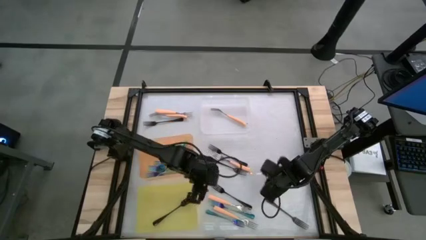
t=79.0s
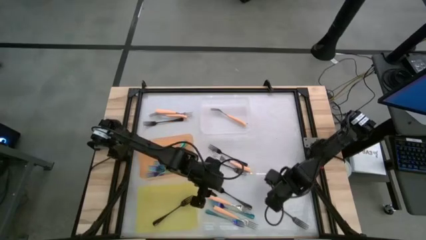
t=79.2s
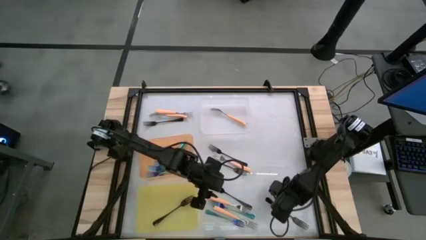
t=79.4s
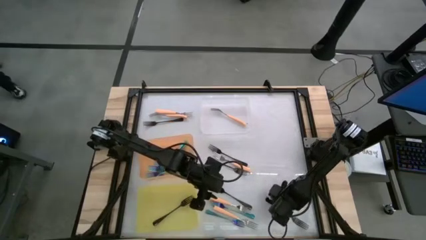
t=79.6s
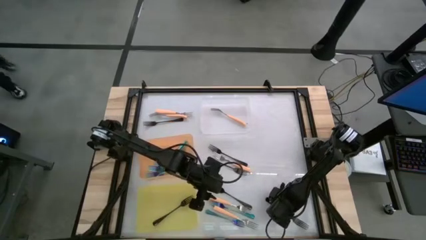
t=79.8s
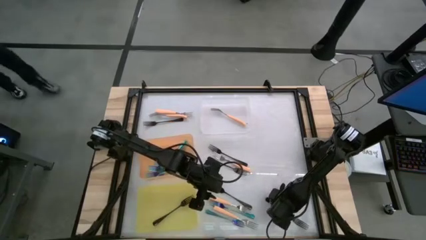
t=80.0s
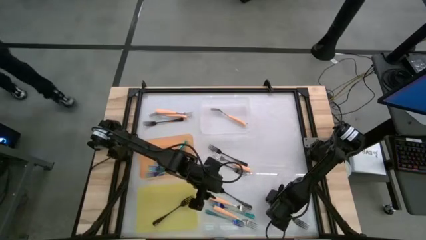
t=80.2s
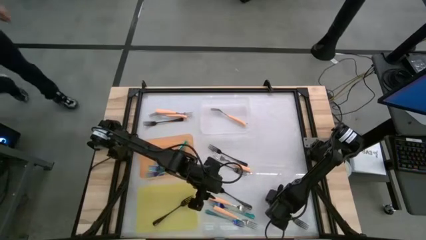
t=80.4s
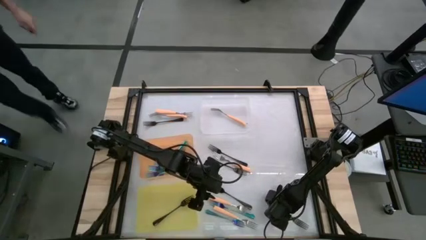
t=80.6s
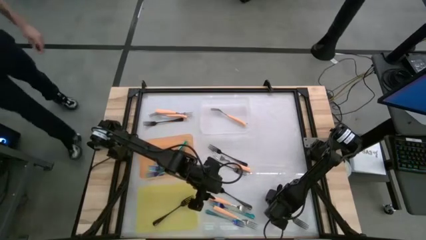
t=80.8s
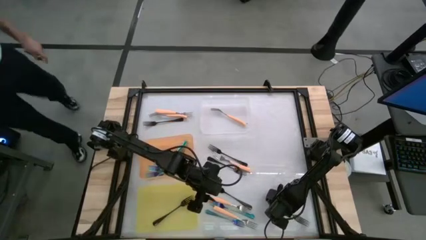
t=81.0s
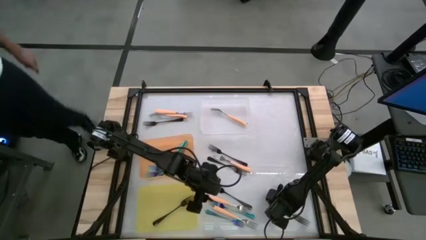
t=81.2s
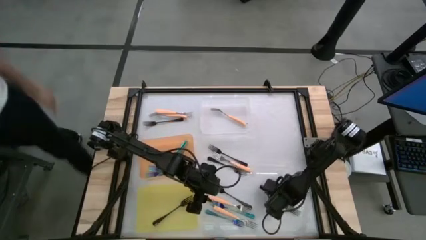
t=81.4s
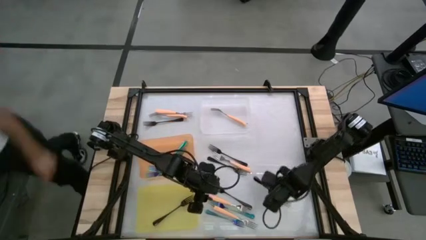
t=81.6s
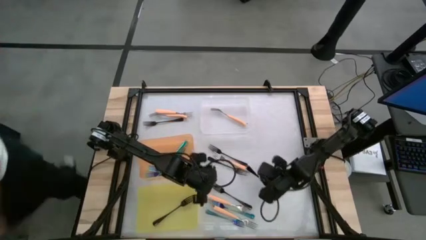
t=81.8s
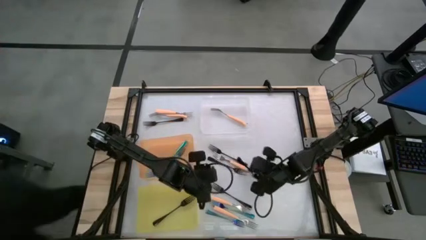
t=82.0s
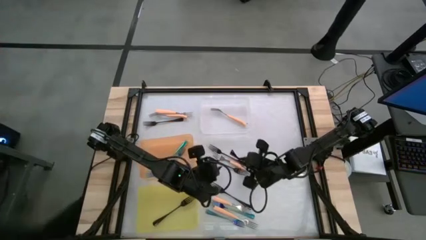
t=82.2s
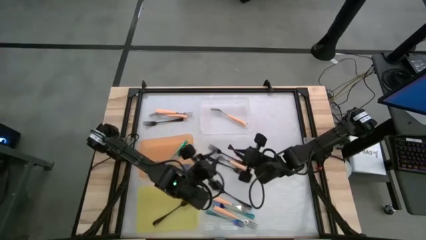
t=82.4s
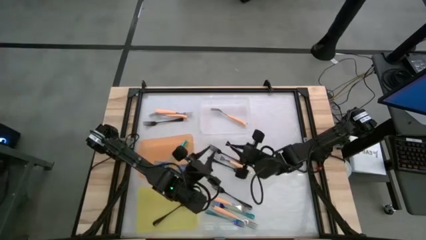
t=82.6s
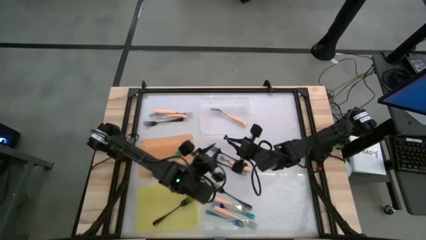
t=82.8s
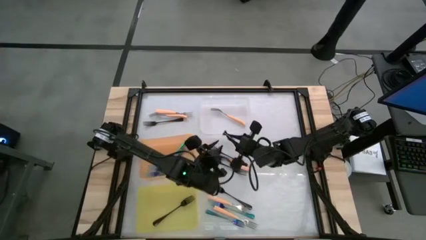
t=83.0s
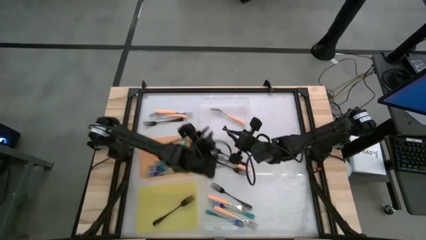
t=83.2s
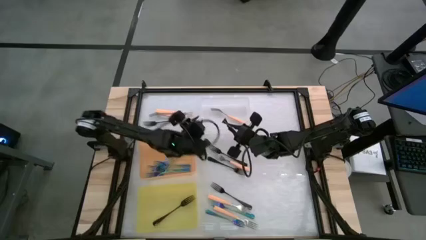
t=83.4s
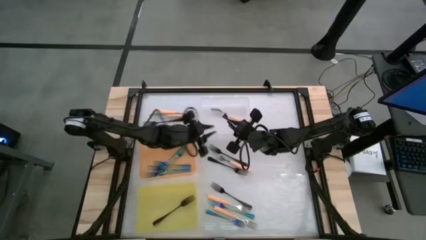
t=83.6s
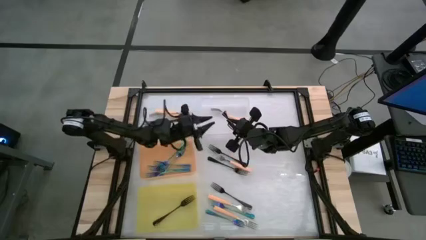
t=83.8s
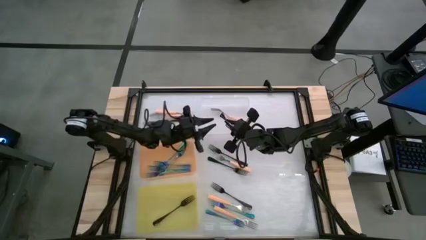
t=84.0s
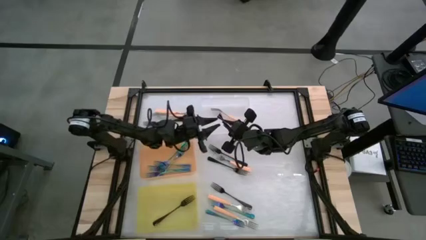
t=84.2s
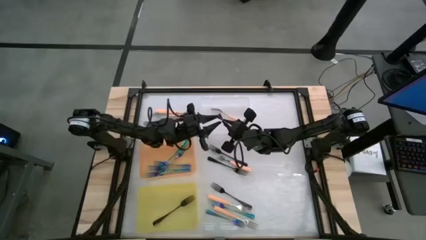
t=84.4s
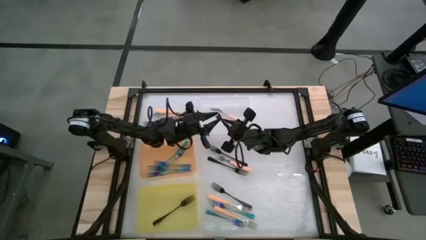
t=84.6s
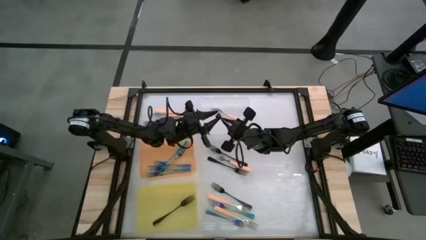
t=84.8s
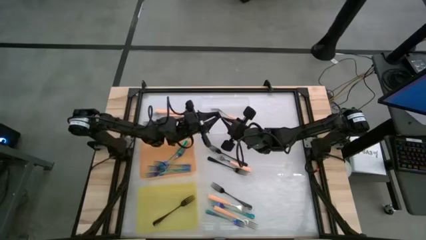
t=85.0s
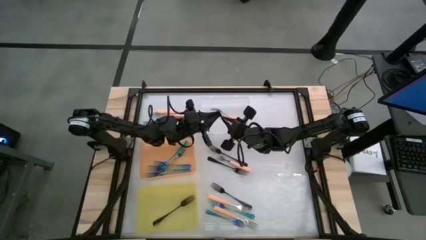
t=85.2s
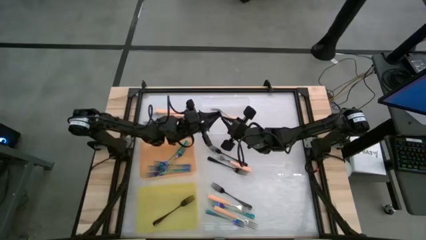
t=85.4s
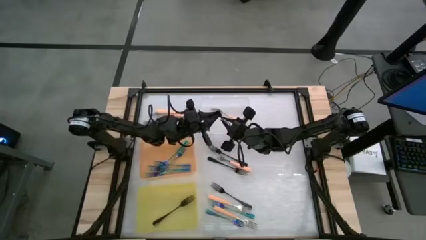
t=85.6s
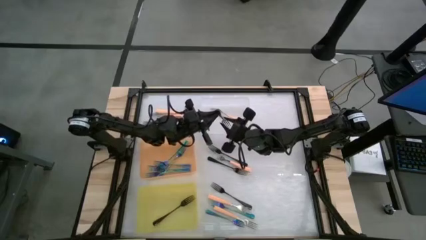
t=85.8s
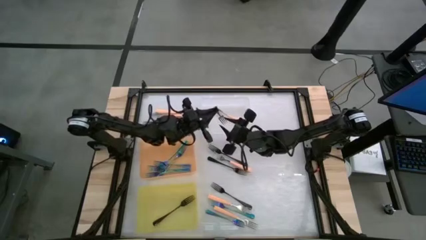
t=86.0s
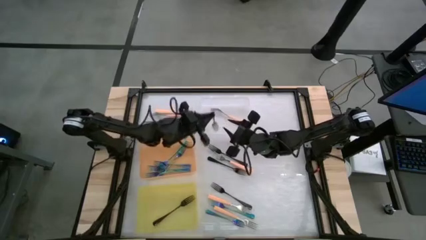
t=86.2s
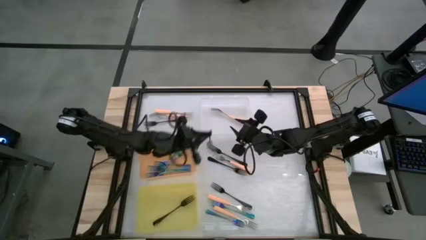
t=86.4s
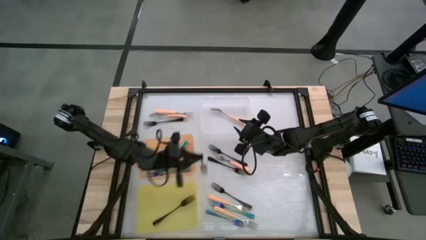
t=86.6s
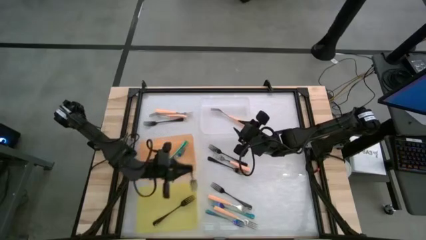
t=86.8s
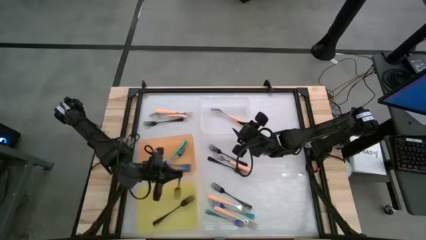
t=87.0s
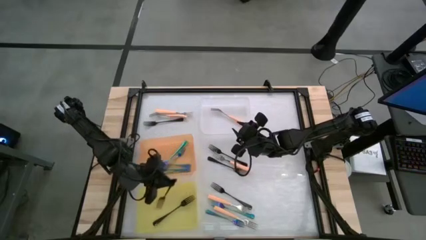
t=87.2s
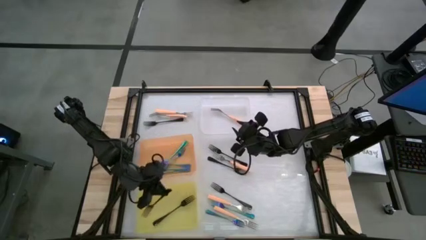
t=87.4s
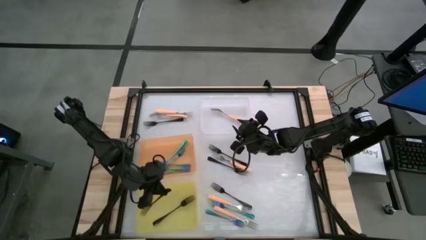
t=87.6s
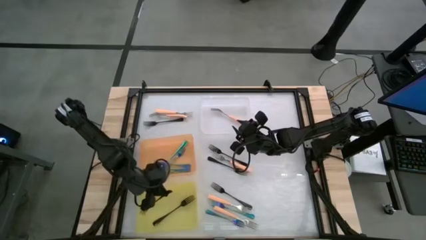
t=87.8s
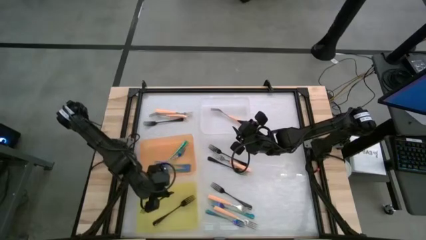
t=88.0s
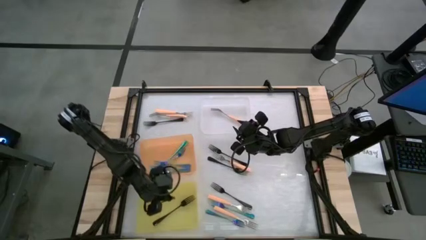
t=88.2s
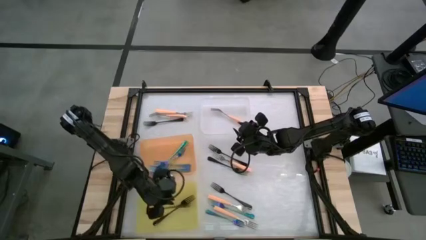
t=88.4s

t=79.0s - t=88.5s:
Task: Sort silverware by color (type)
Put the black fork into the yellow bin

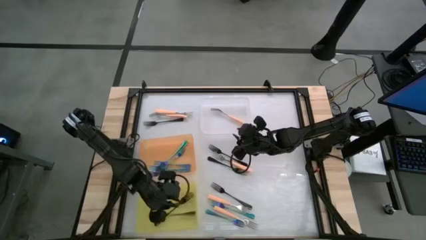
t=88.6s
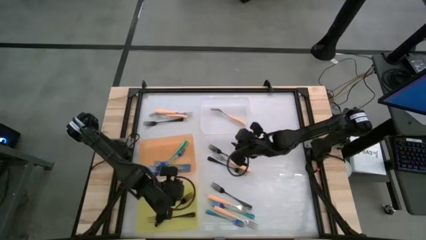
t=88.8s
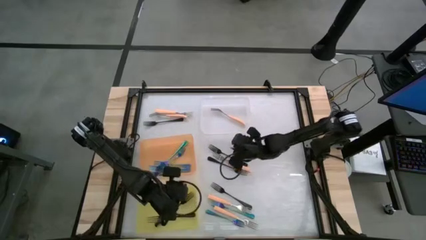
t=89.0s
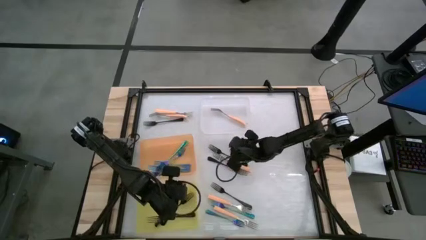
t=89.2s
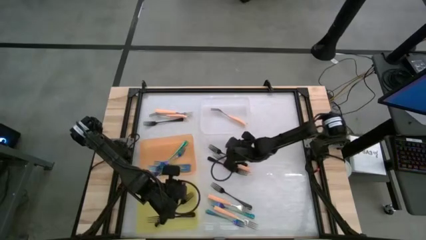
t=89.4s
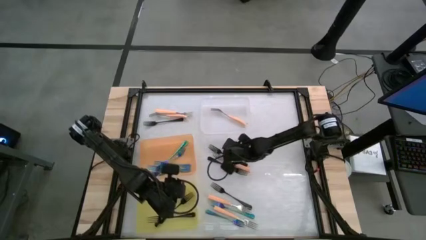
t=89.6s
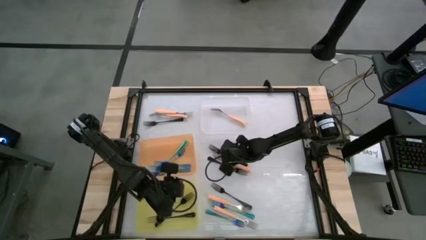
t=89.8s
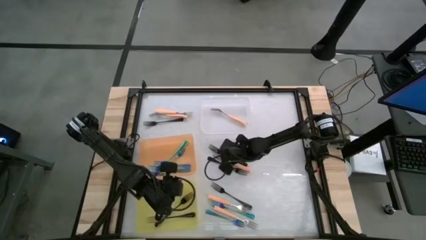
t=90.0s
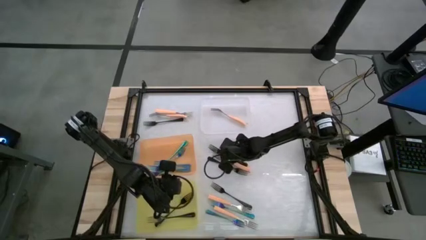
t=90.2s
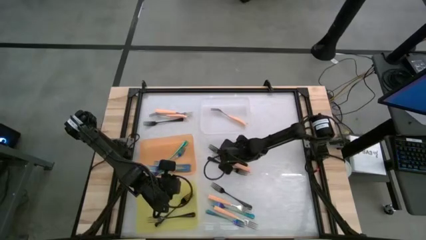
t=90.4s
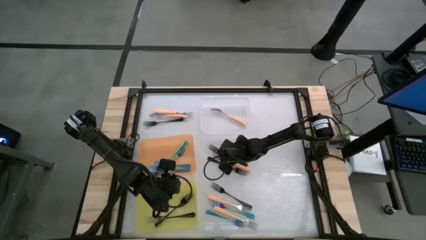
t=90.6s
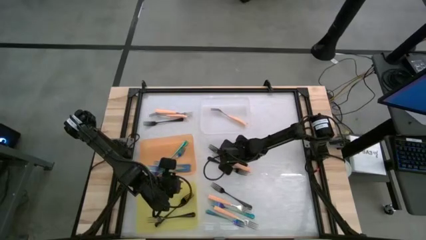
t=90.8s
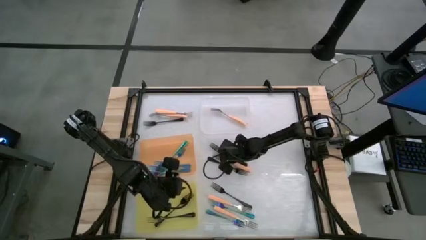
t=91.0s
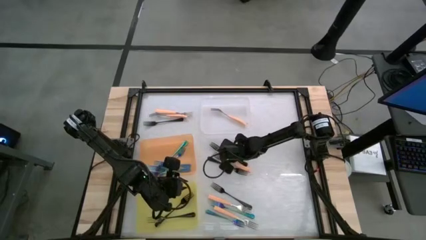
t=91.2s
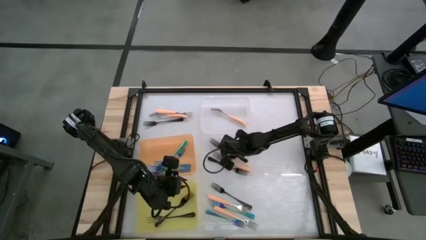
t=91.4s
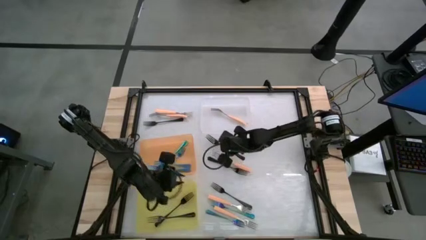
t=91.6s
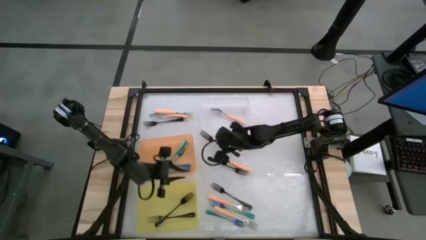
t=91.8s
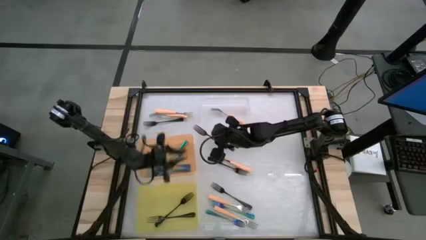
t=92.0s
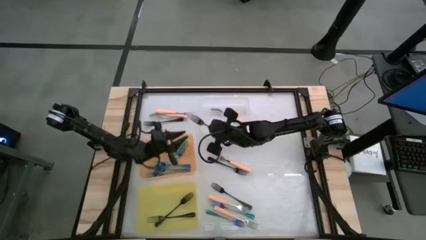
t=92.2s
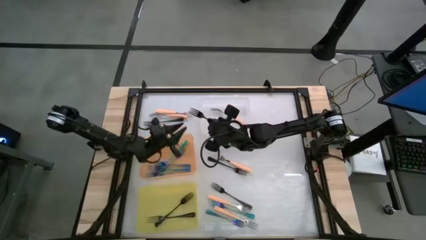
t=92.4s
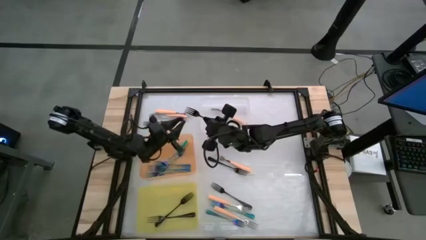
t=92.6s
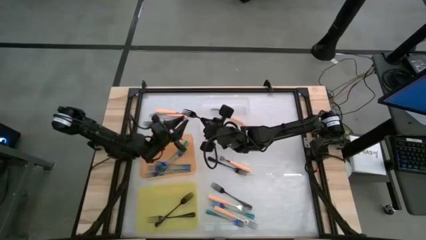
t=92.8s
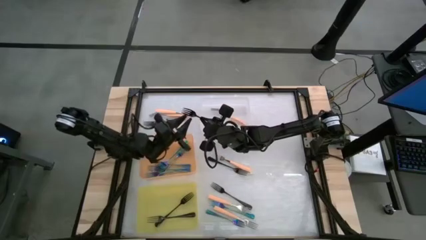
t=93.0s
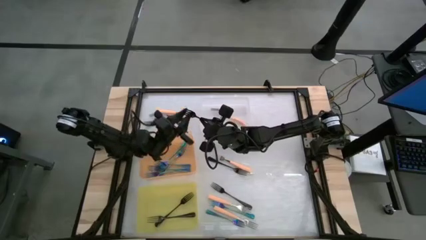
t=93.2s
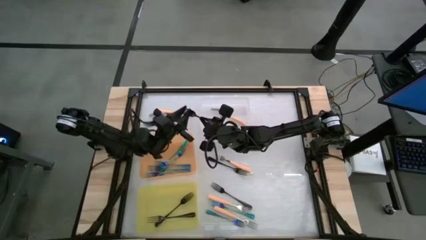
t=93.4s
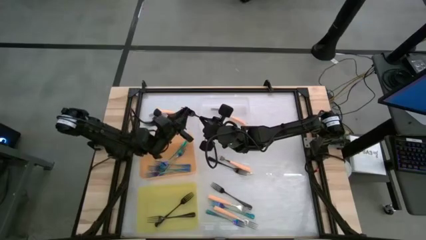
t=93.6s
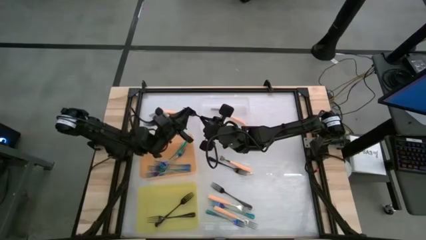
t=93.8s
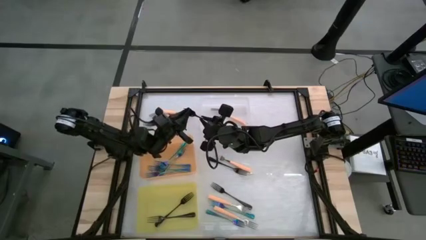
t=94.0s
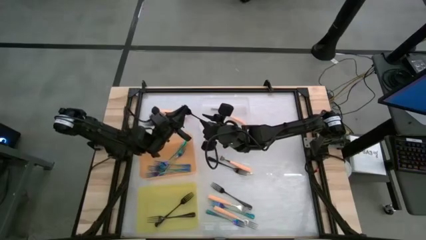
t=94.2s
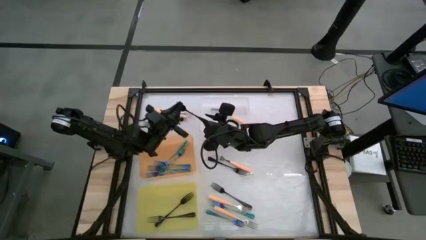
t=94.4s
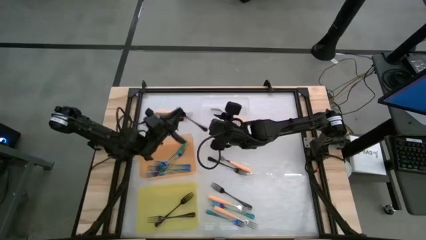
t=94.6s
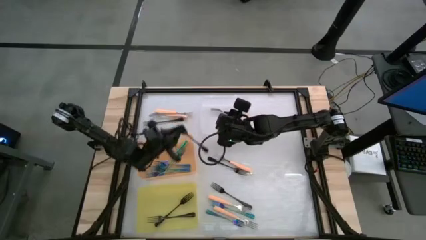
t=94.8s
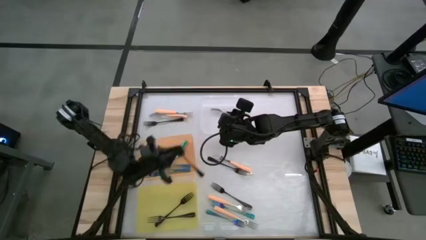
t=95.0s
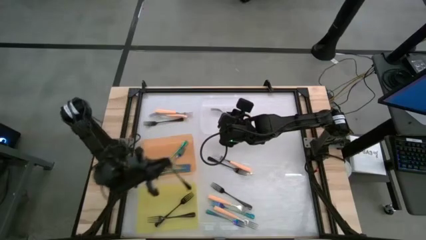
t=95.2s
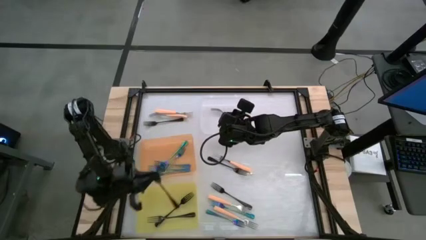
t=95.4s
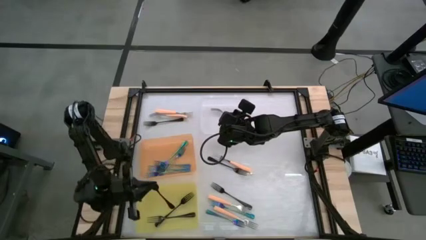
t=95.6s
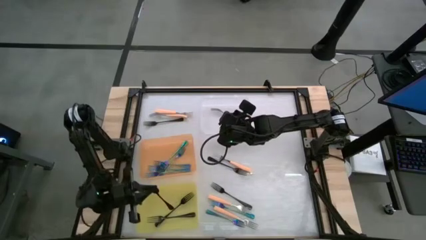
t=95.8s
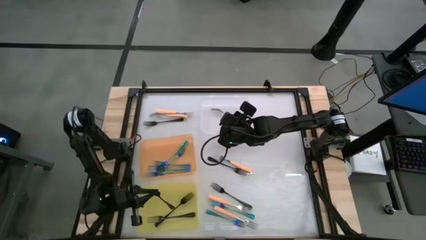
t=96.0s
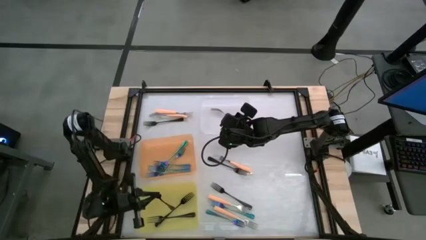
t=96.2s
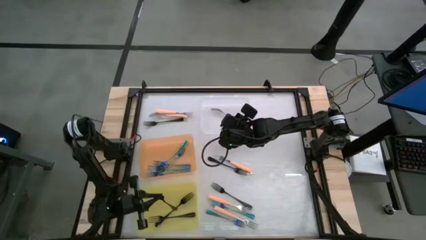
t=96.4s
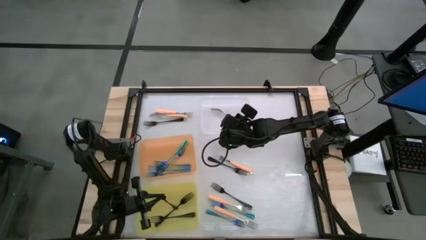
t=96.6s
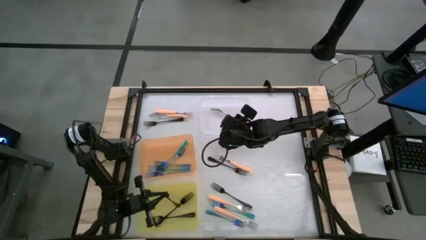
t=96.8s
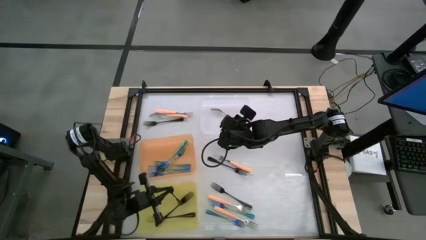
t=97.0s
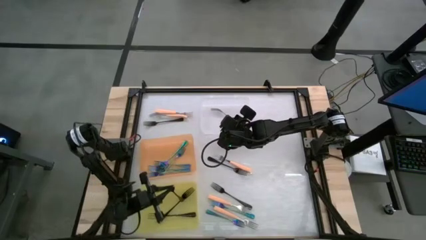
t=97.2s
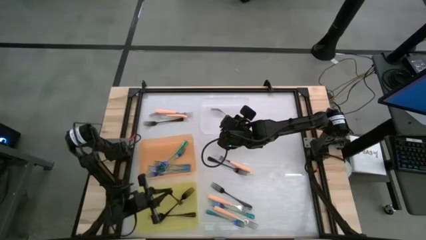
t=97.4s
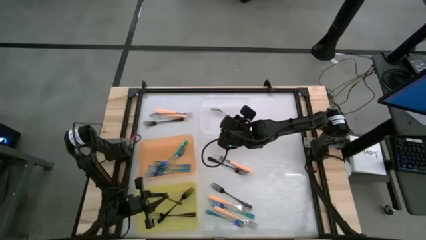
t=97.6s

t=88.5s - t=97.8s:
Put the black fork into the yellow bin
